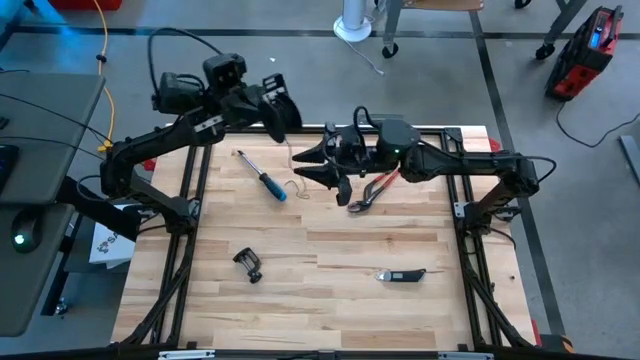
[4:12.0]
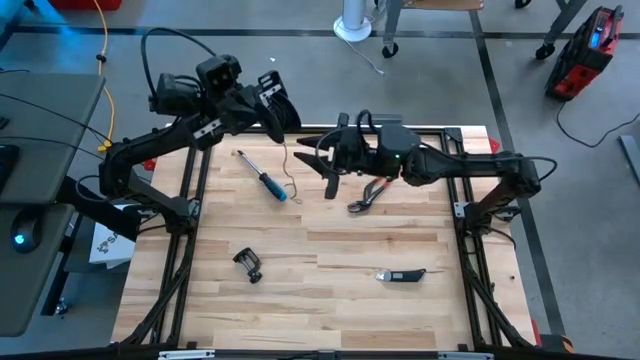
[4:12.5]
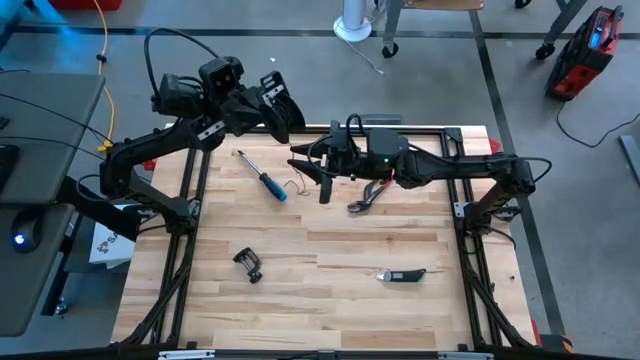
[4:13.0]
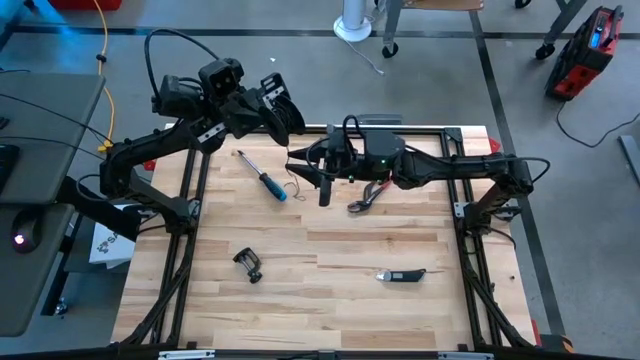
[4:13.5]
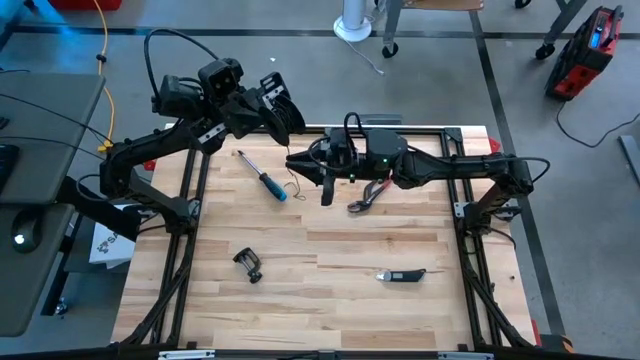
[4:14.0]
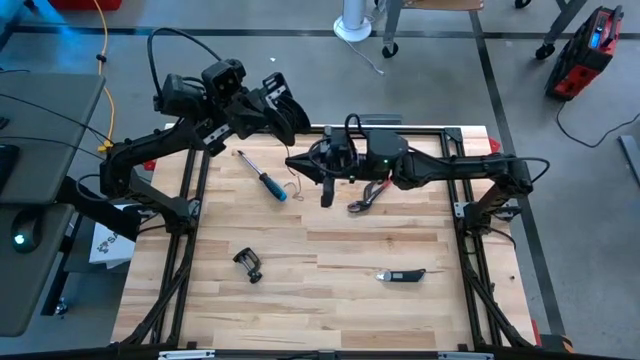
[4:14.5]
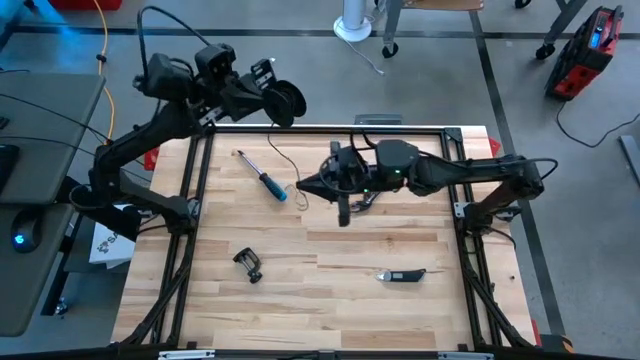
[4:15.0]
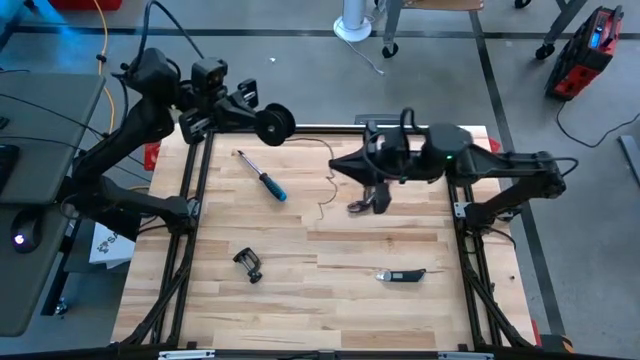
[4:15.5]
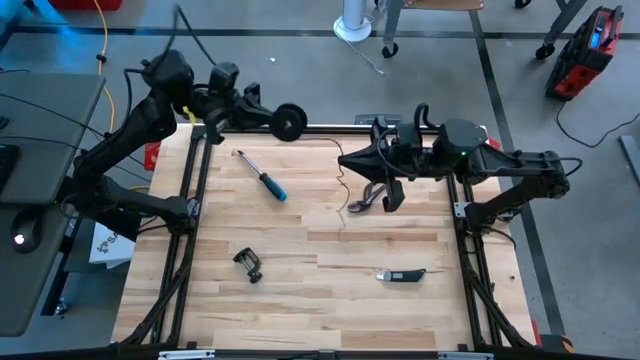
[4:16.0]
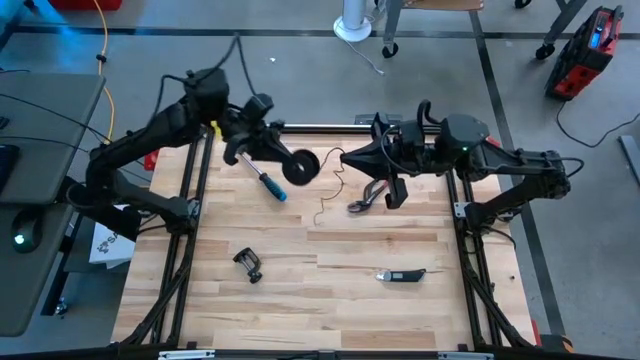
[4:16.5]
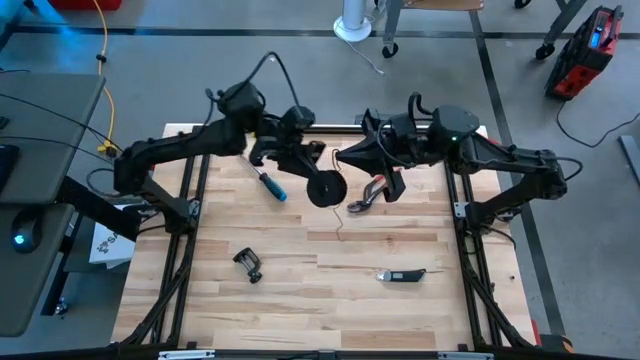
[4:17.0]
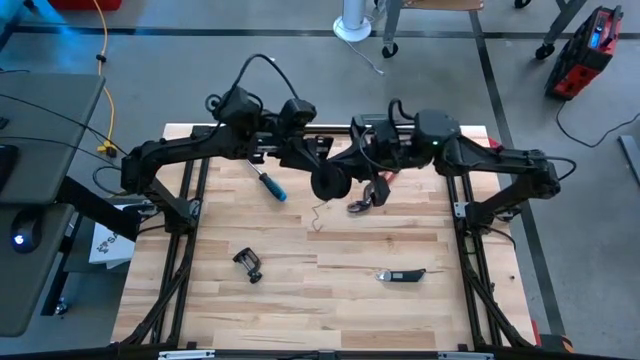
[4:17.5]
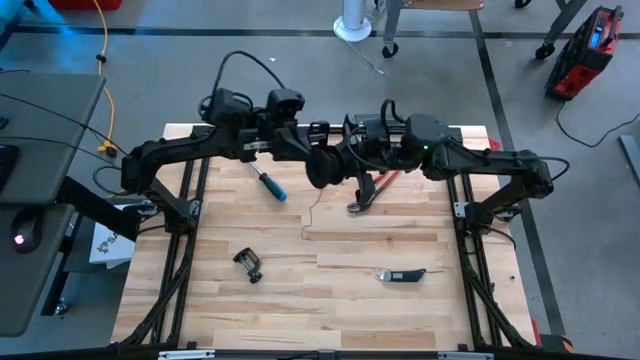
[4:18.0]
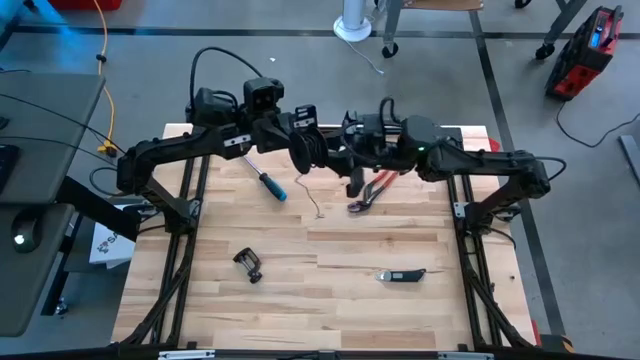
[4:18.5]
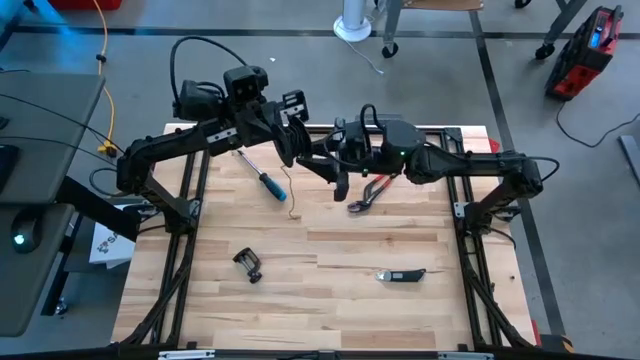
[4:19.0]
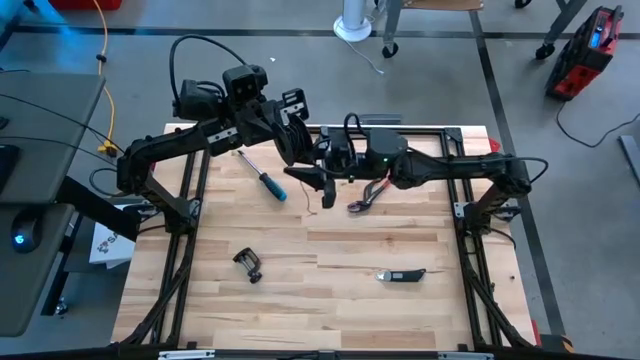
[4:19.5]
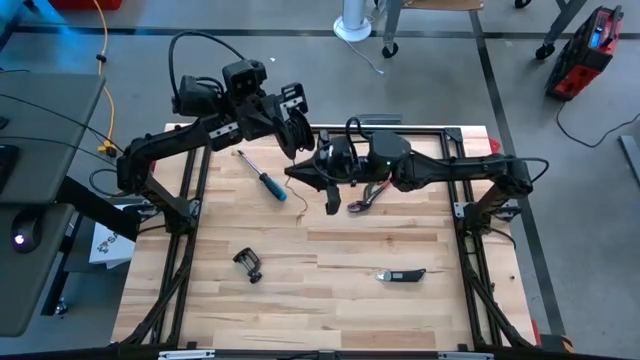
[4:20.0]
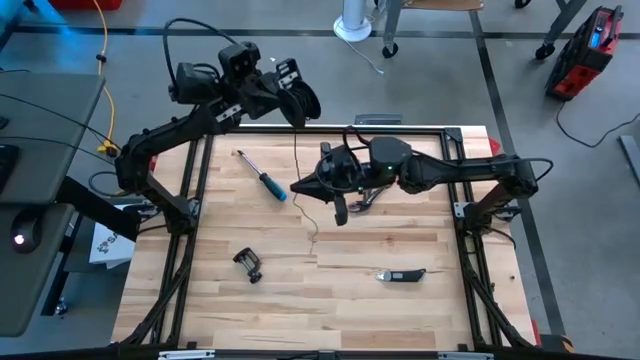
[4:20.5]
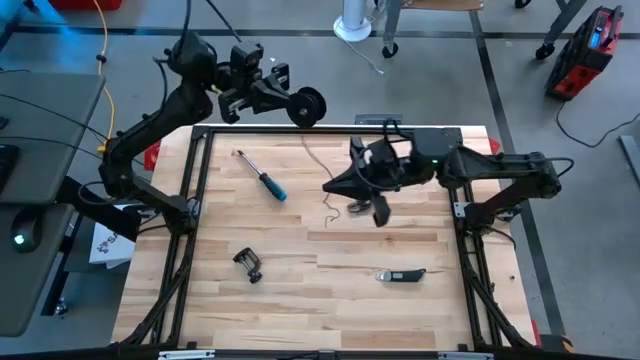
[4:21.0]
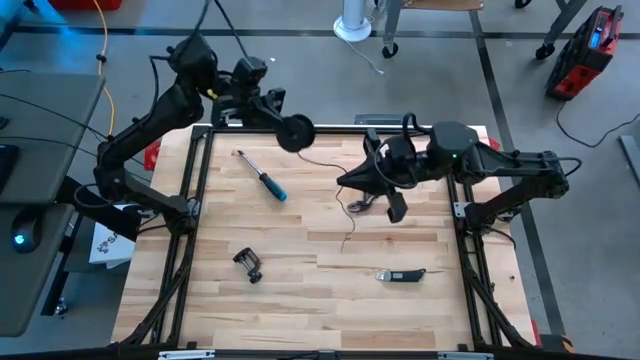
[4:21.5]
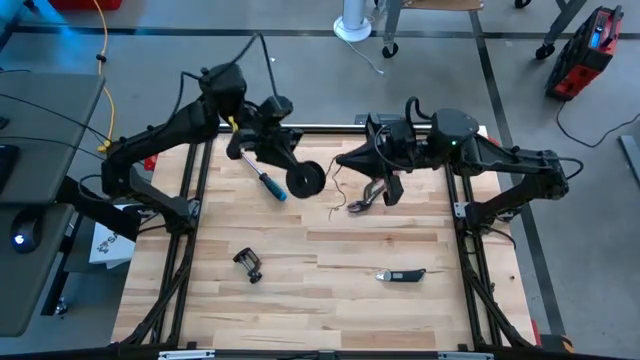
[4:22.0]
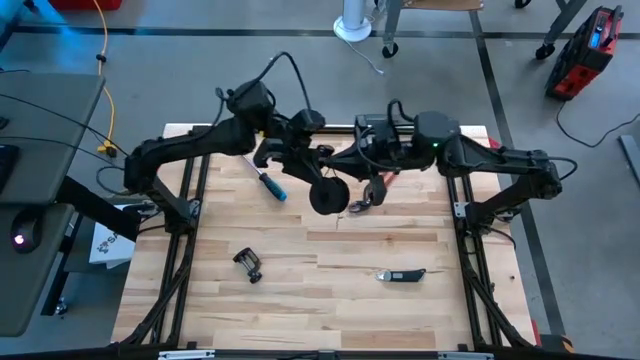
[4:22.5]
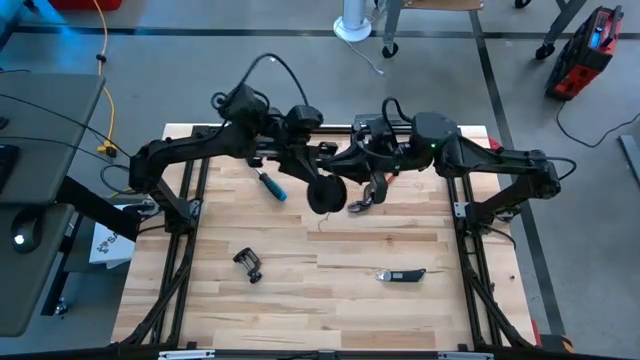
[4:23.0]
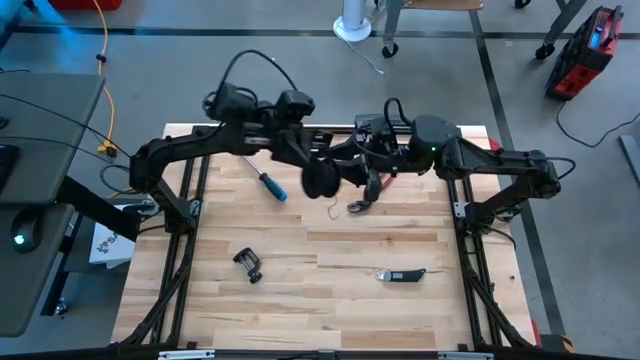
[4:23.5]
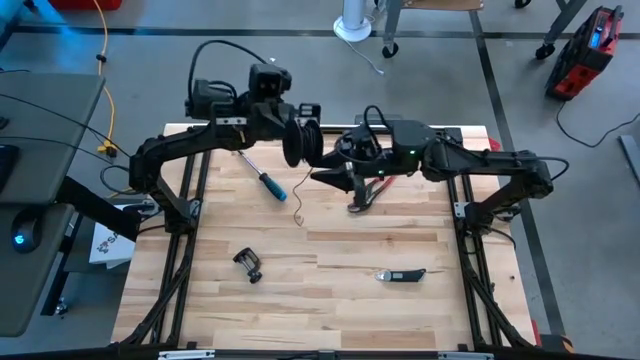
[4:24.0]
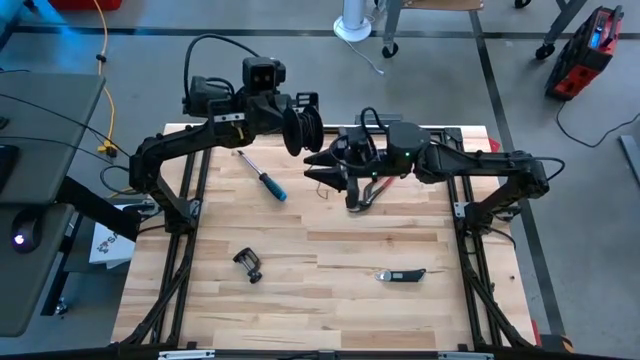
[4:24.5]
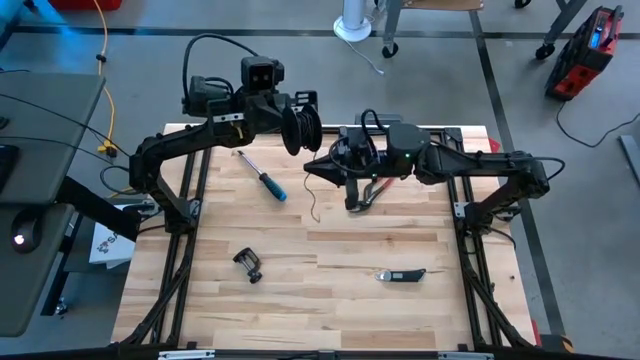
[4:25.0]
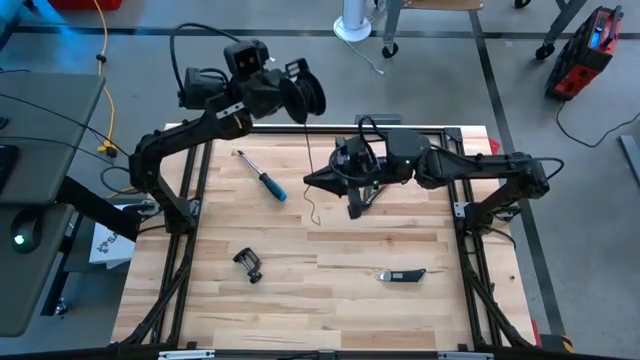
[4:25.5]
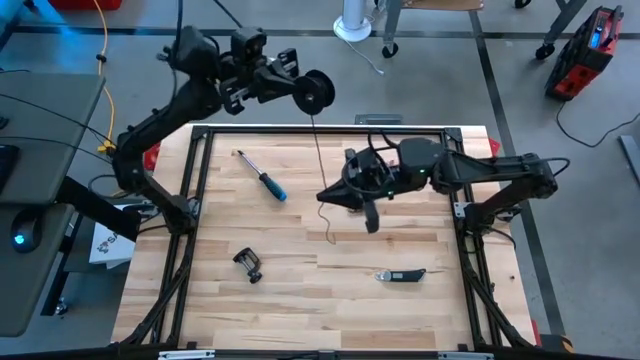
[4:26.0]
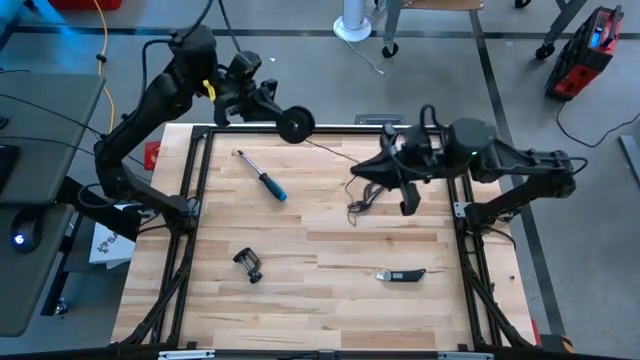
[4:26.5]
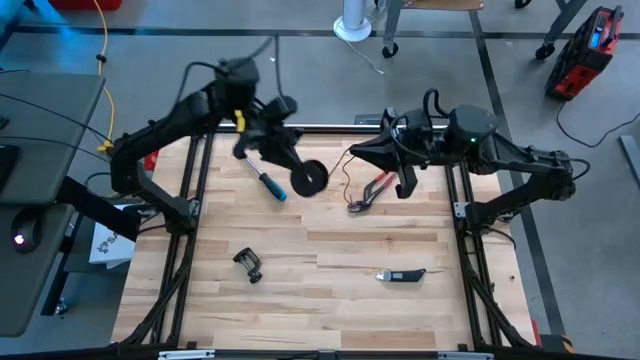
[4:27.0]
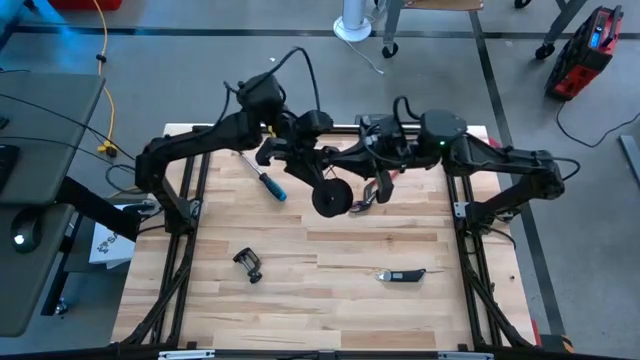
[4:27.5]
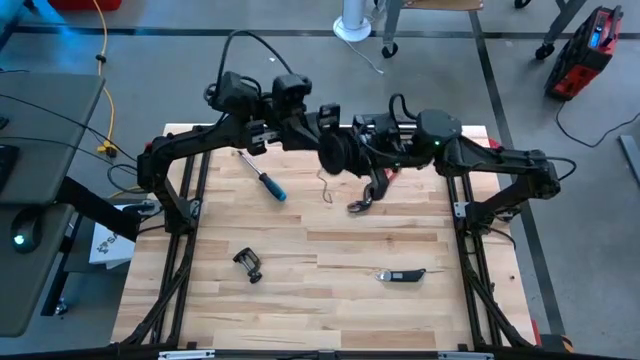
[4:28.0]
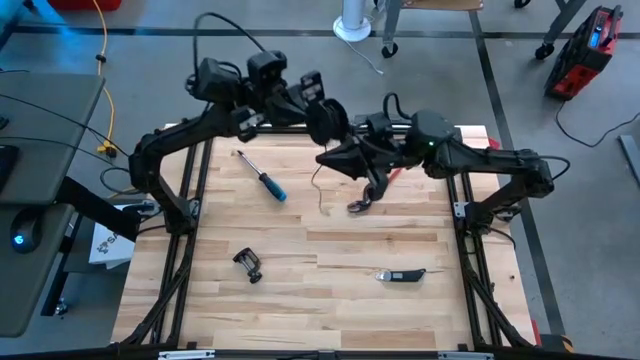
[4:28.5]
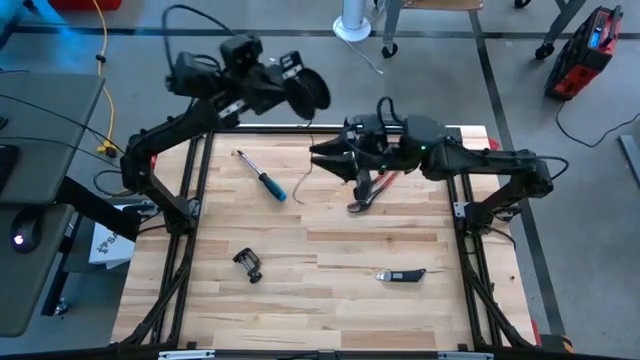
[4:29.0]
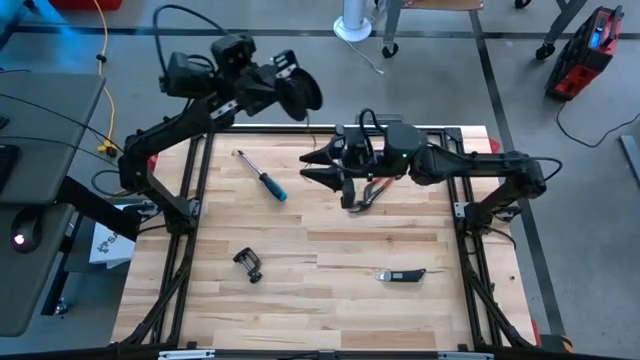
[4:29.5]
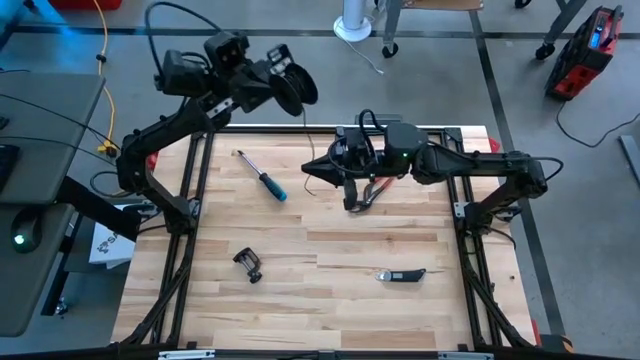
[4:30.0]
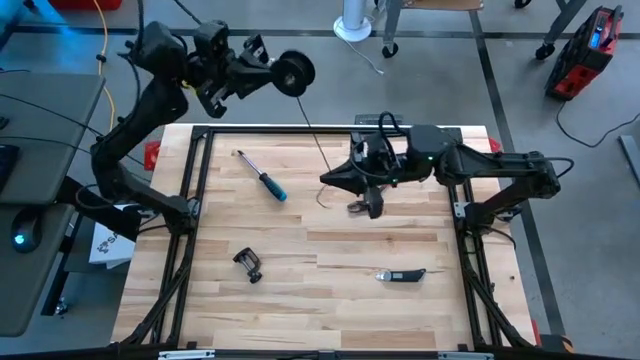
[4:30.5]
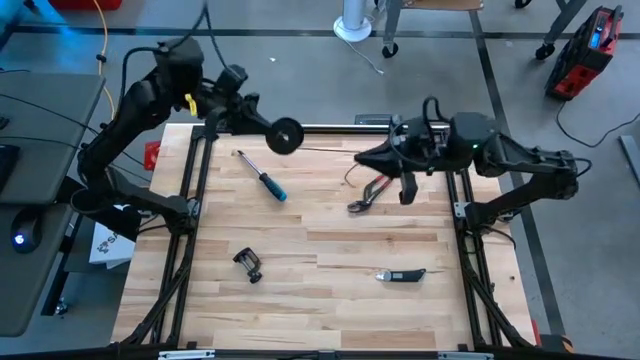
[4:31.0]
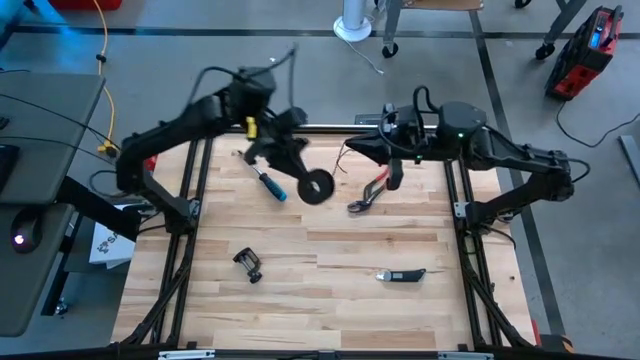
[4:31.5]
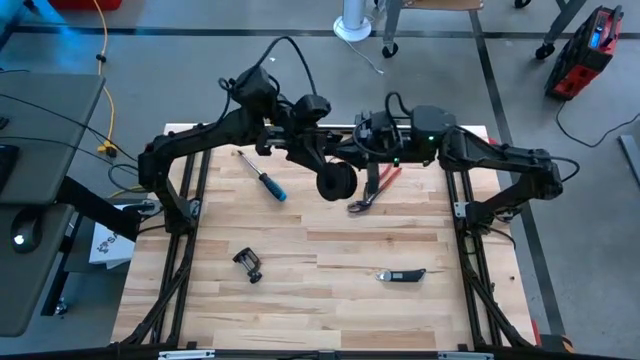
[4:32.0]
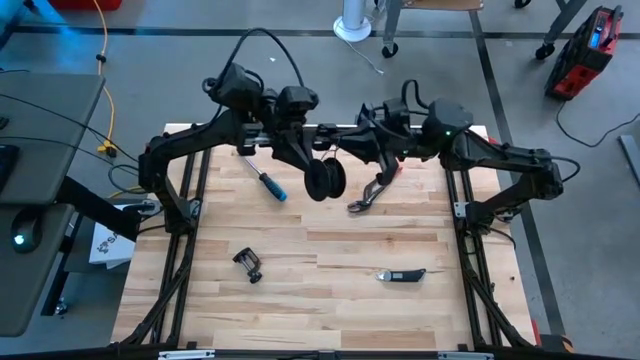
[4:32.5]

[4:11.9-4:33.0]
Task: Coil cords
Coil the black wire onto the black spool
